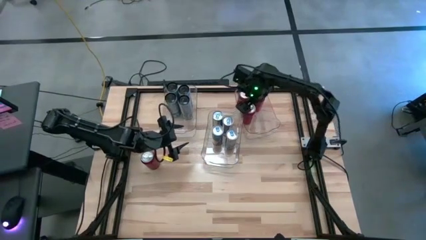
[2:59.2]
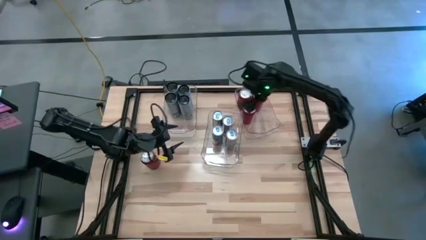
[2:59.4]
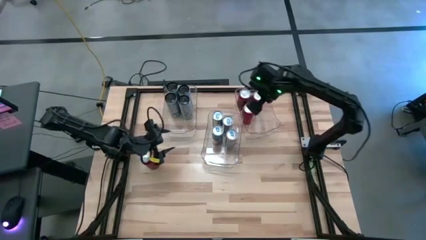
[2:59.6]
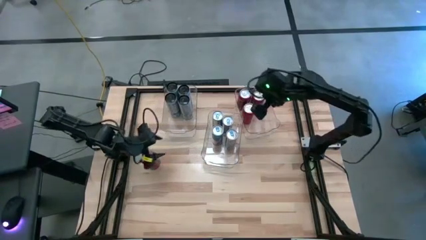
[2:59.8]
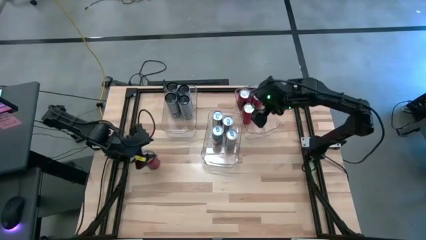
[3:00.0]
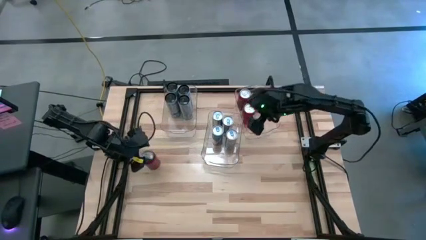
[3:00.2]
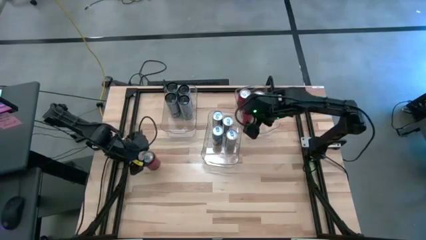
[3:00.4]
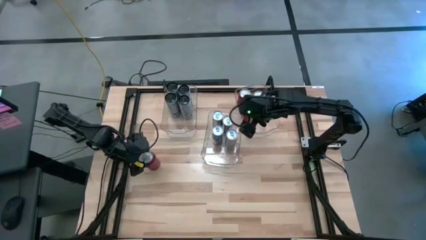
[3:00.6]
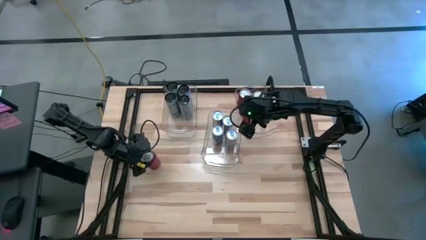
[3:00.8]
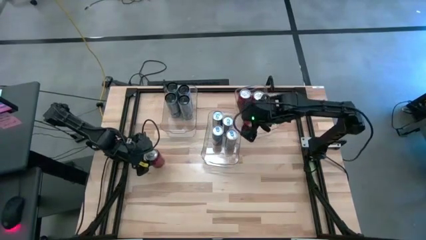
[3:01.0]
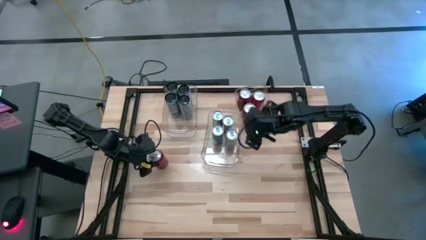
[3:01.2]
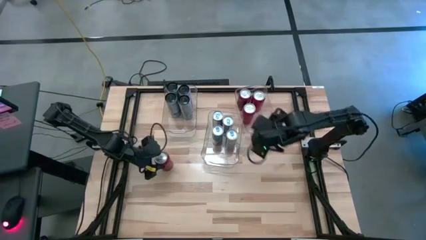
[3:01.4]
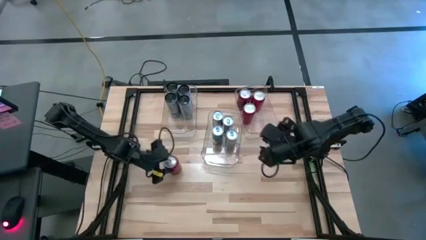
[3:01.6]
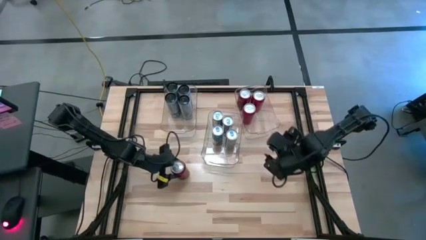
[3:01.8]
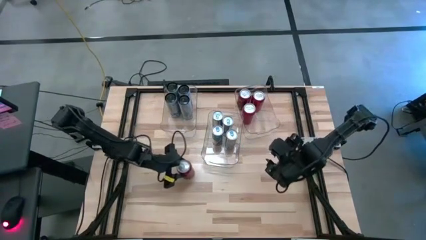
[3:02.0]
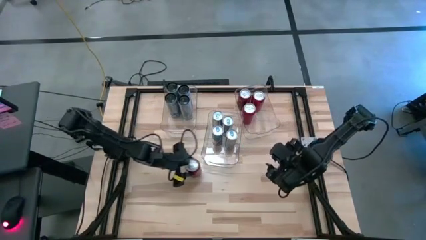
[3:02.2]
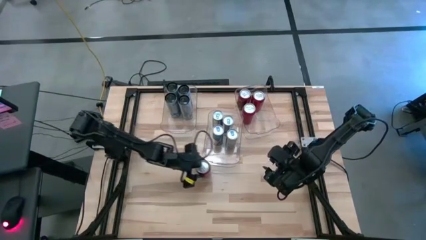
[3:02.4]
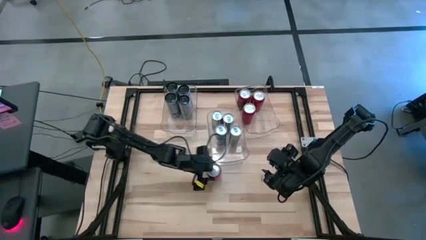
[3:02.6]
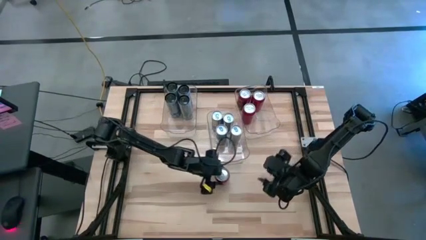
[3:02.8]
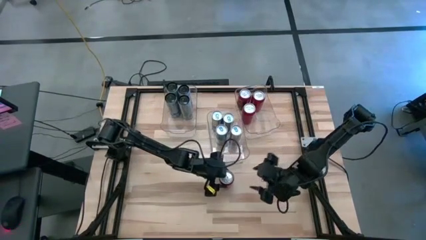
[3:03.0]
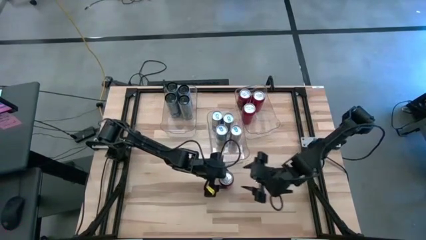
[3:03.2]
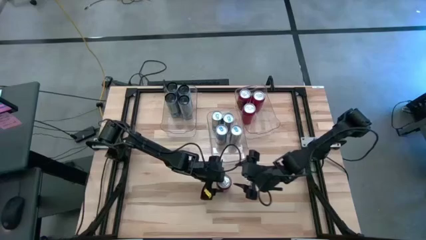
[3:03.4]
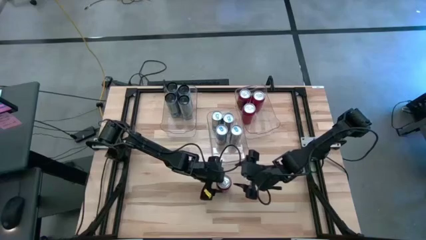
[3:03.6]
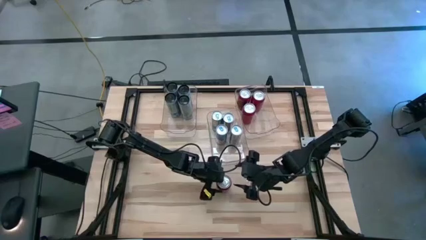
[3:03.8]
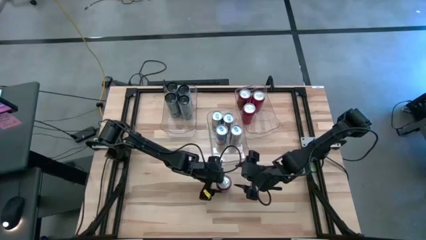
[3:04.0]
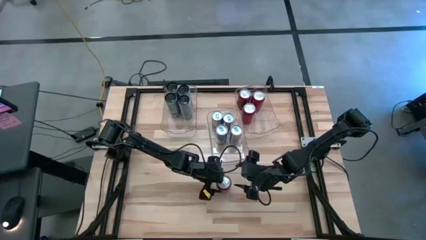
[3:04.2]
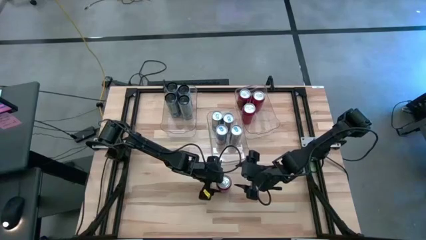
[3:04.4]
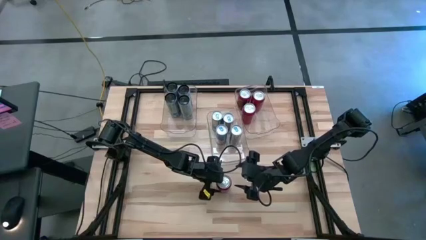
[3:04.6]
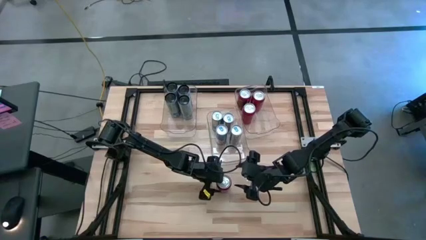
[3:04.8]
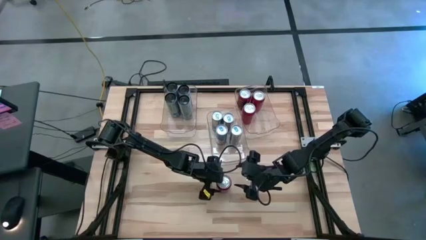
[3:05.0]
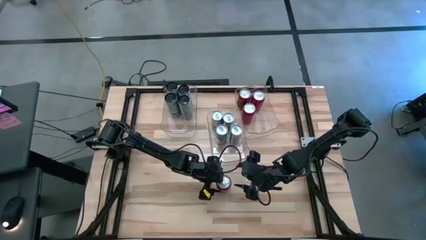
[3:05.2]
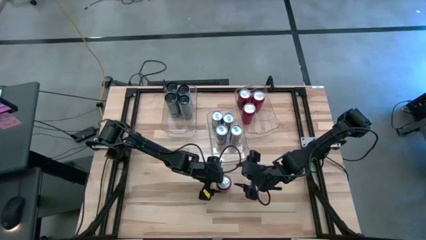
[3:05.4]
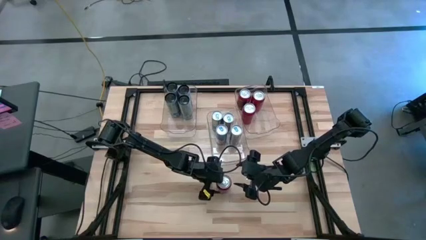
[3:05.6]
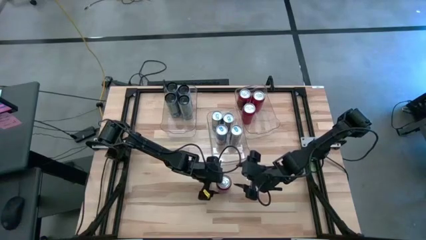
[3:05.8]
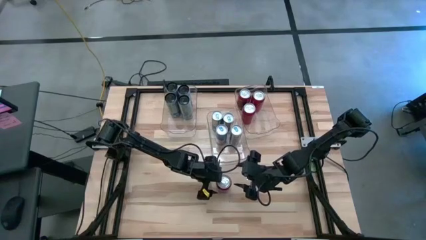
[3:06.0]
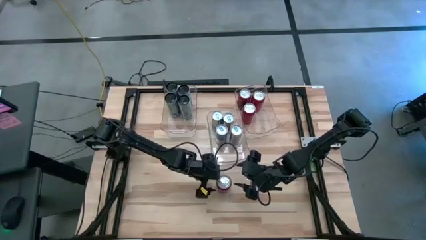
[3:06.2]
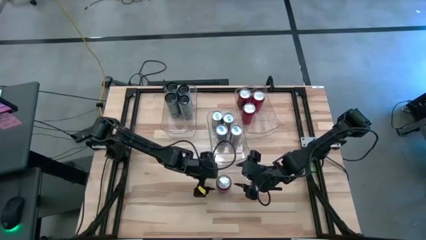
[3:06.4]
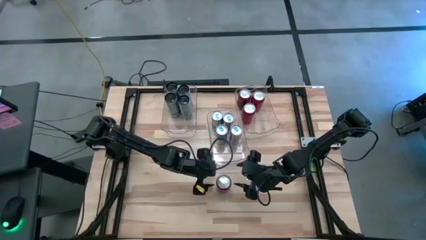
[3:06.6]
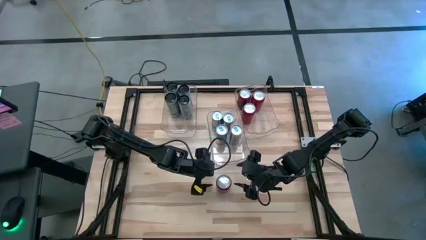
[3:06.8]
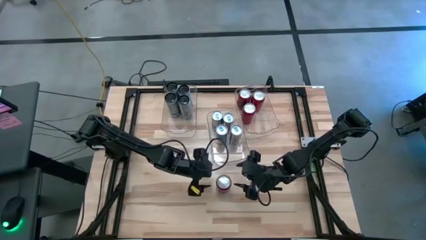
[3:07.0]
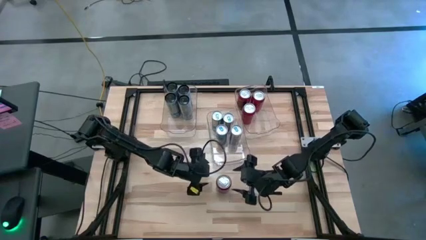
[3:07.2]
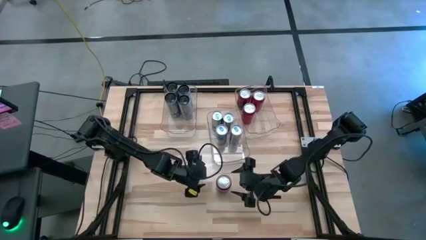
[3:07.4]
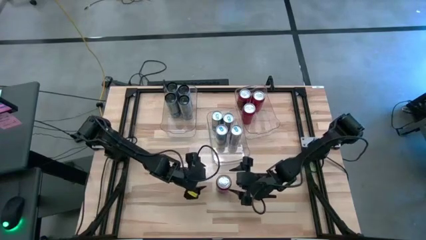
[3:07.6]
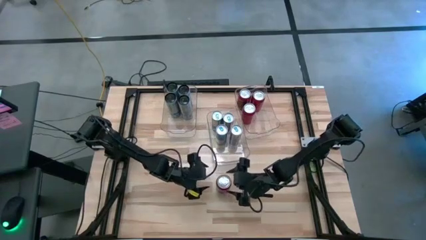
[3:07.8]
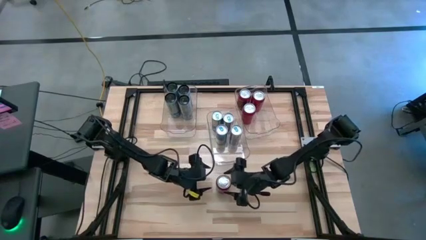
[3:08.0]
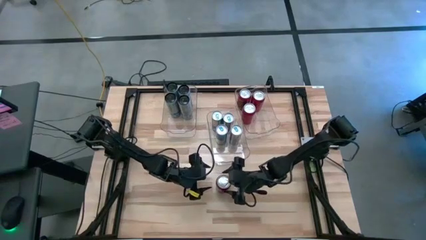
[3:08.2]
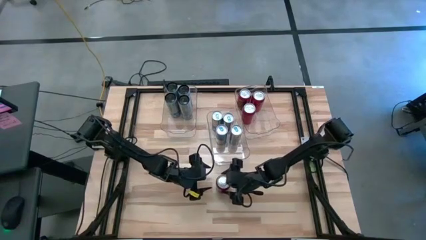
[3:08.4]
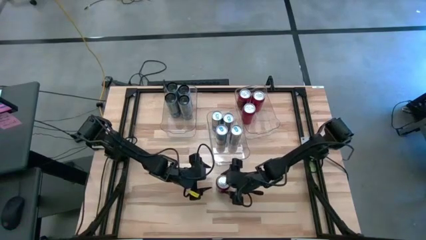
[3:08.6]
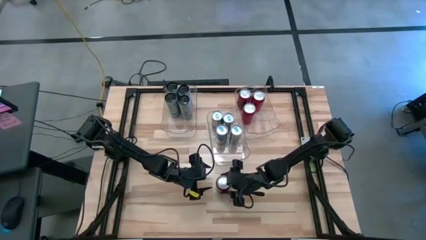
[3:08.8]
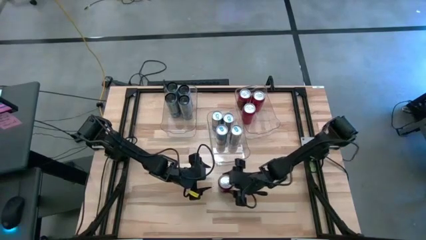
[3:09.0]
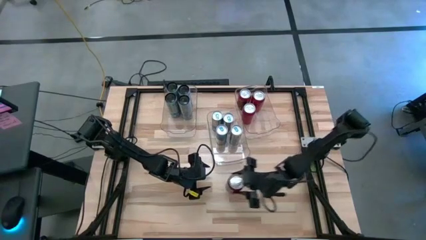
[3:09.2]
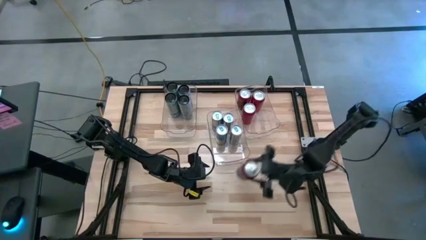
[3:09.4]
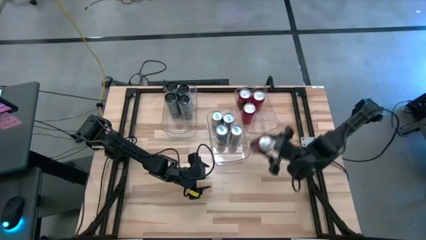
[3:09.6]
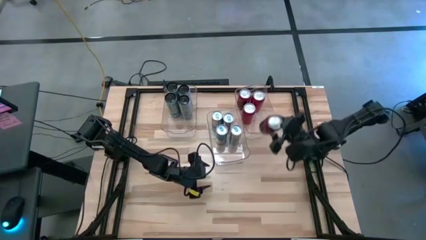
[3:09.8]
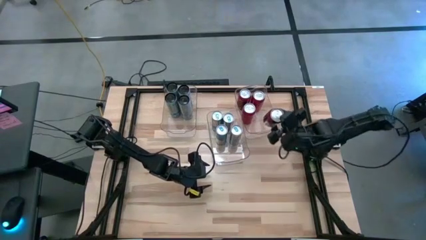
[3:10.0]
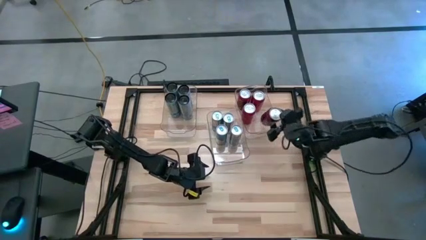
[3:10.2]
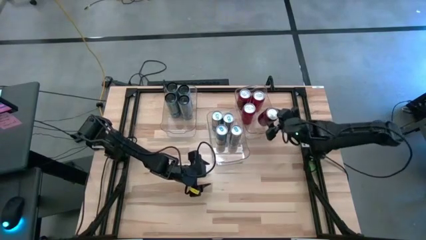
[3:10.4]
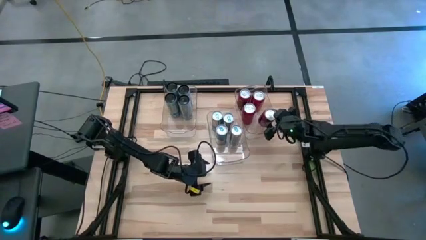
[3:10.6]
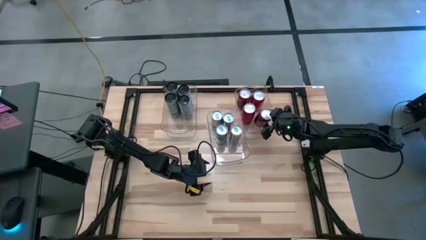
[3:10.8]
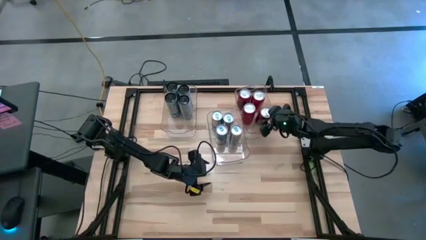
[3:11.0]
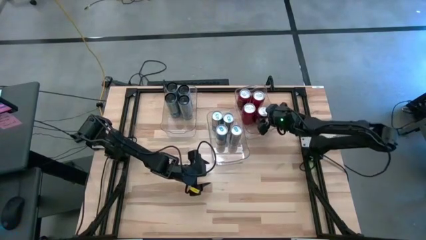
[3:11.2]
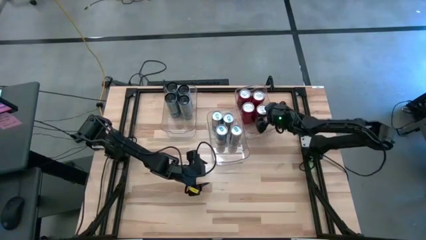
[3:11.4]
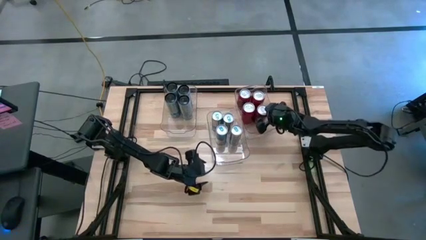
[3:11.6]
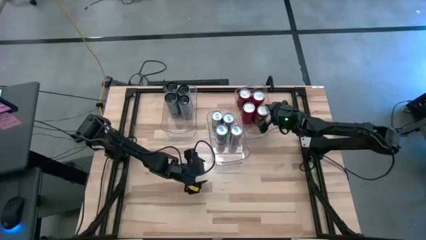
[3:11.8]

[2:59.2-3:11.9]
Task: Sort soda cans
Put the red-black soda can into the right transparent bin

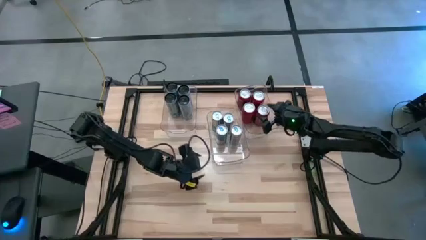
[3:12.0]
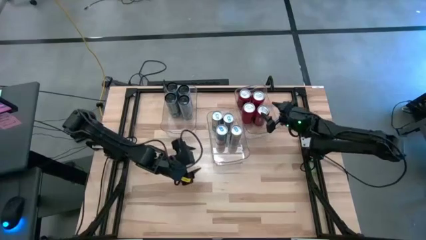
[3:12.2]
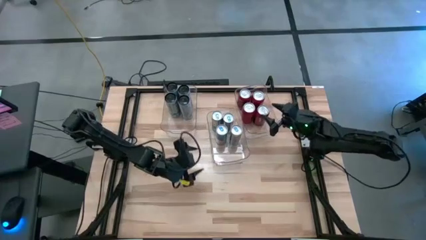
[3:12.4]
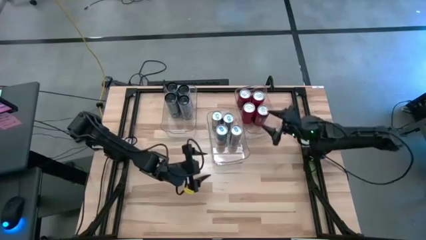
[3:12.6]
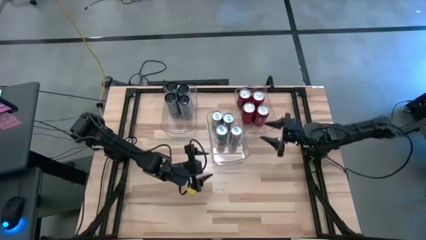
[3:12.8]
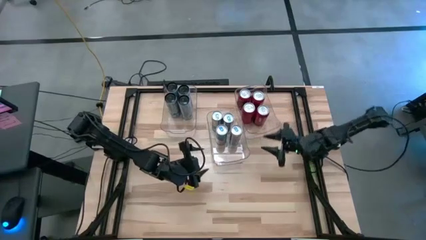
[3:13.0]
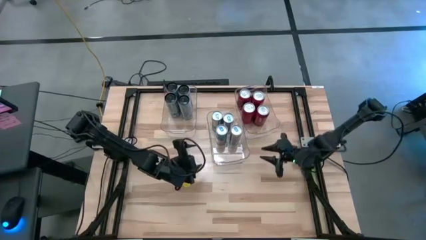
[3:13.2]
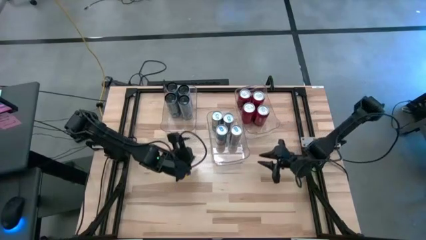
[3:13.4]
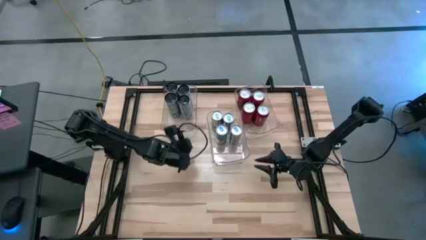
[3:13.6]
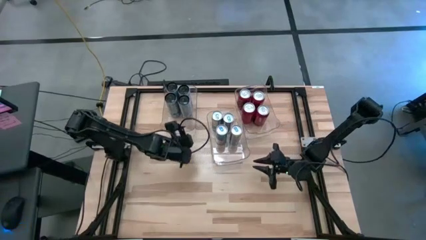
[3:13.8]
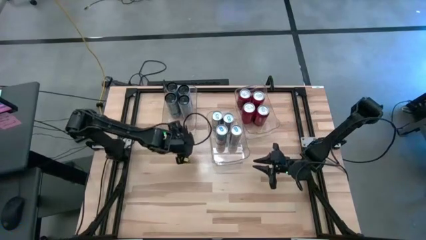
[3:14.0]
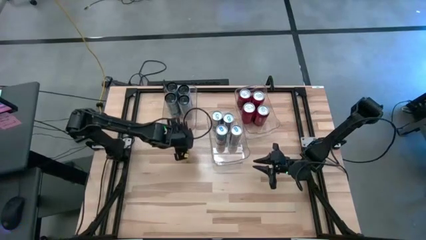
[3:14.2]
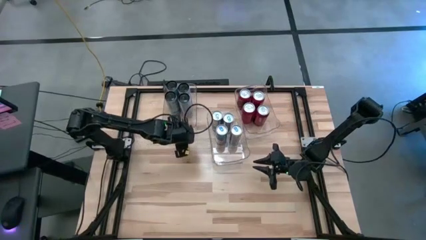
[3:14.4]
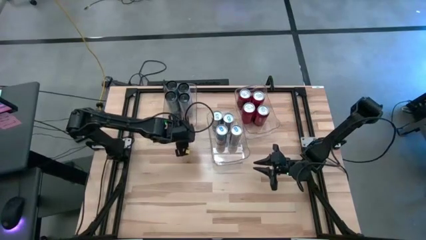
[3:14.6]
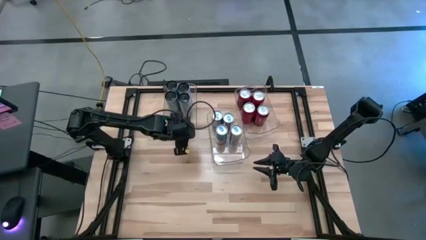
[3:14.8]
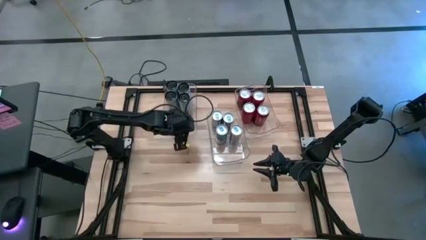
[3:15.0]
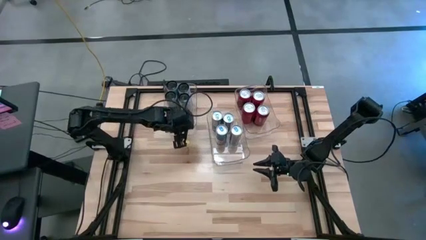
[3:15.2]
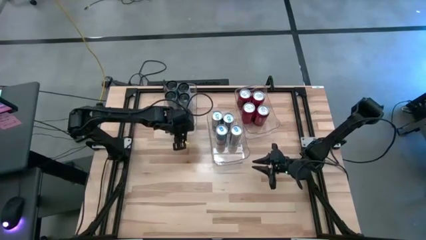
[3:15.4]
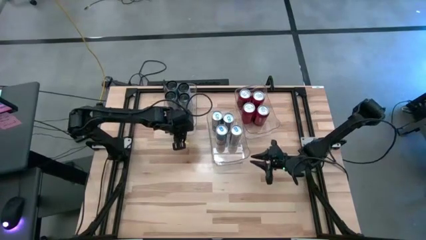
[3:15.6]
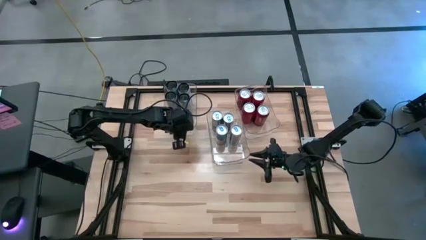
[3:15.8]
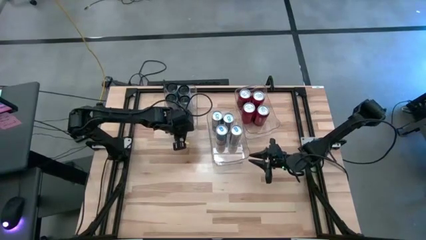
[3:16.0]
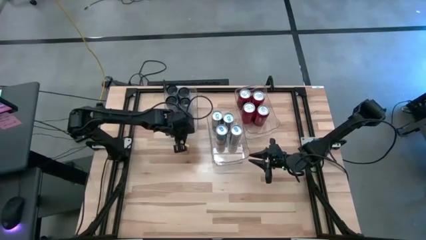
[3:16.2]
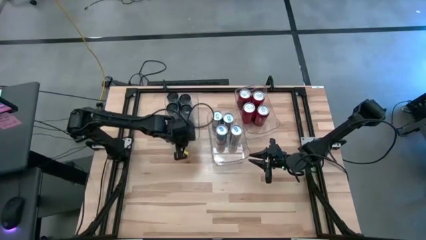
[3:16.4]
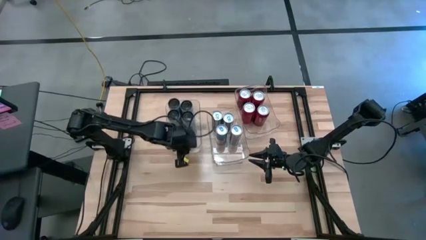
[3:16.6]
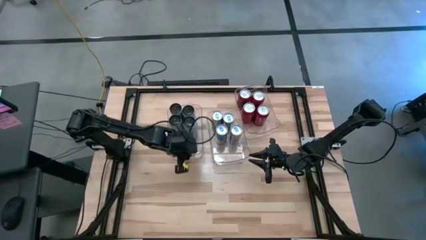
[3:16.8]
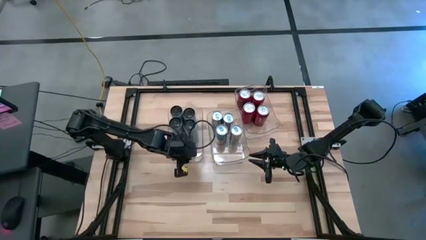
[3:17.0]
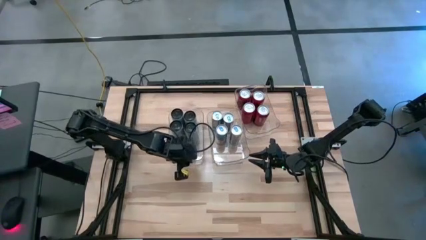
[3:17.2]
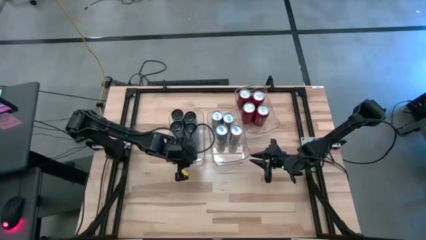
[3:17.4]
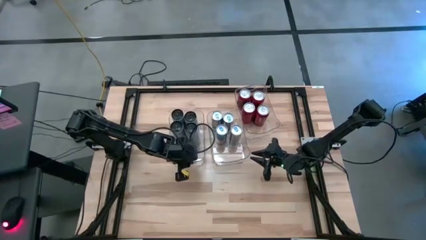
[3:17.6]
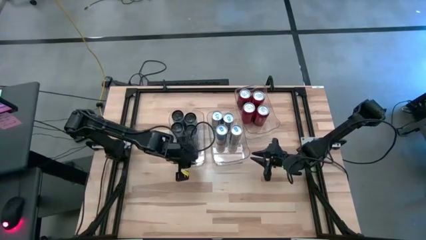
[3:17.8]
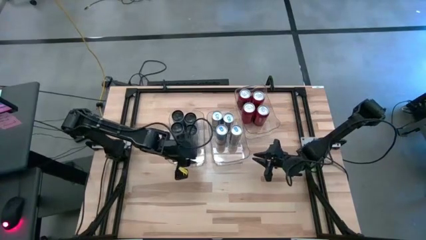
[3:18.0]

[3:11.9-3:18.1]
Move the left transparent bin to the center of the table
